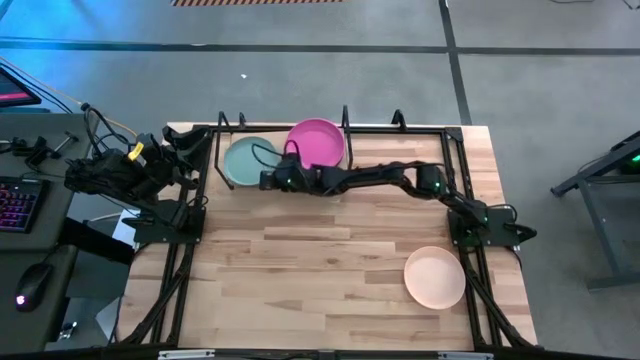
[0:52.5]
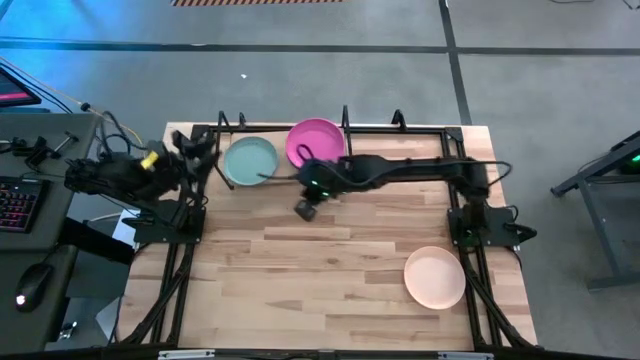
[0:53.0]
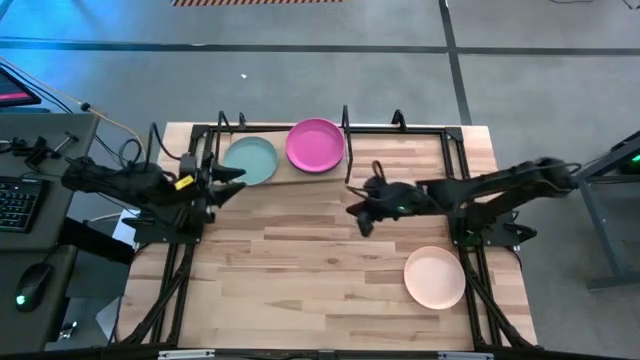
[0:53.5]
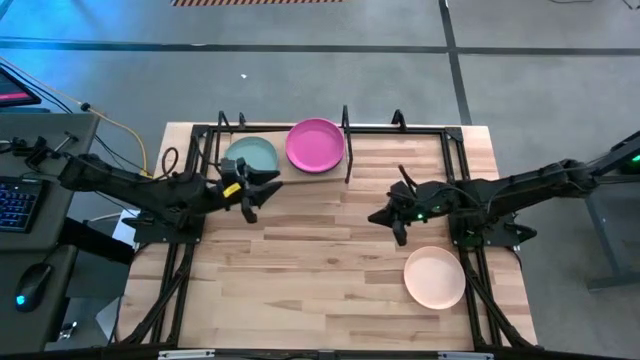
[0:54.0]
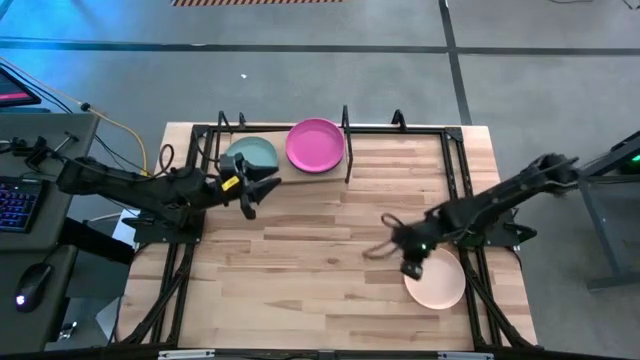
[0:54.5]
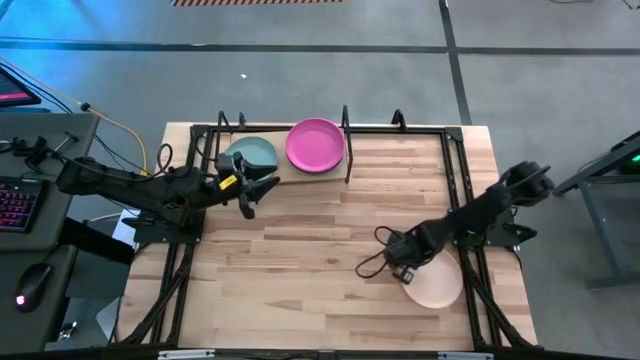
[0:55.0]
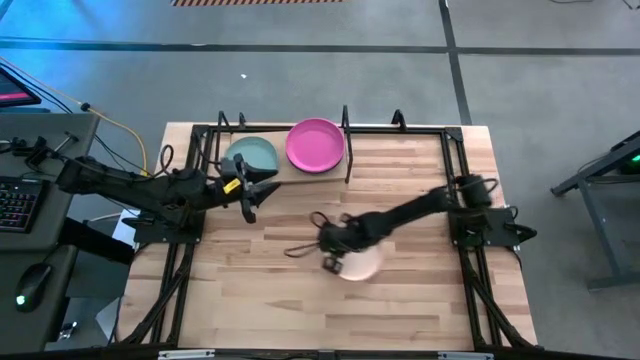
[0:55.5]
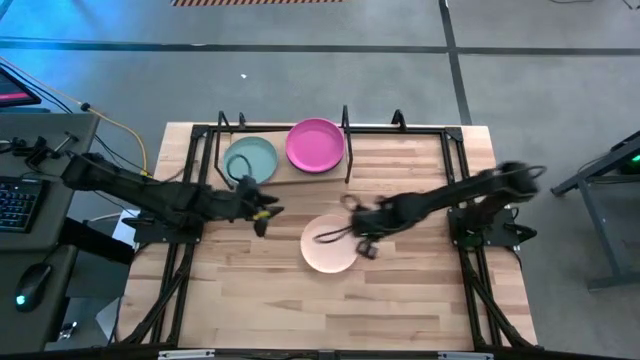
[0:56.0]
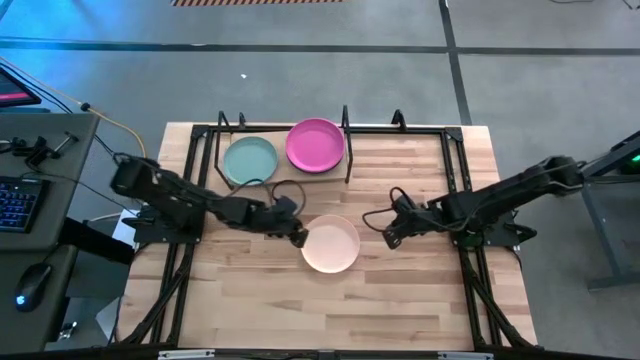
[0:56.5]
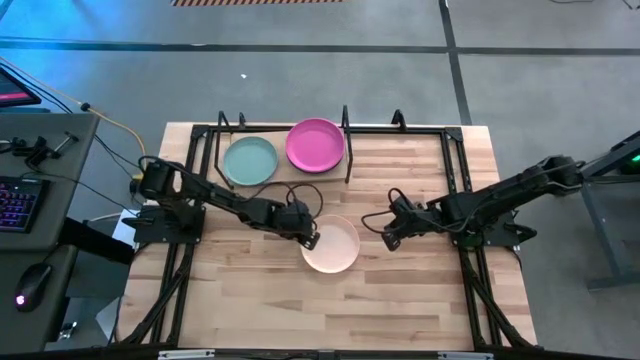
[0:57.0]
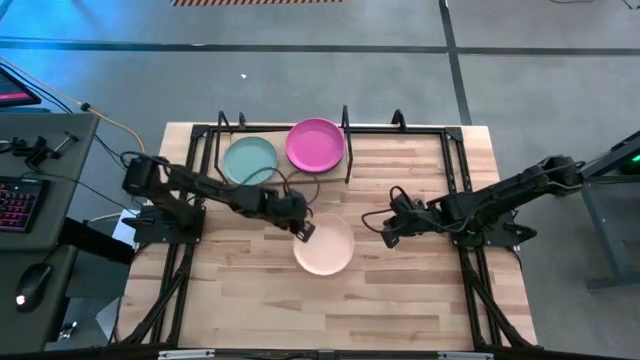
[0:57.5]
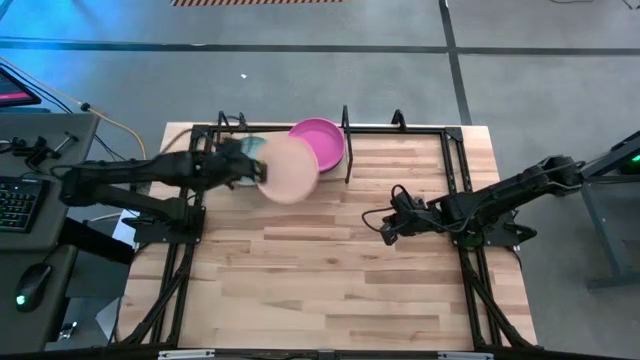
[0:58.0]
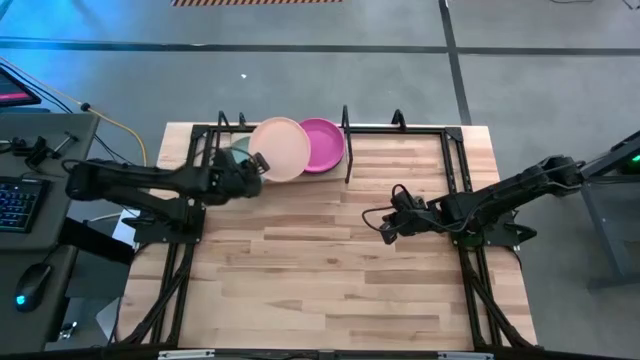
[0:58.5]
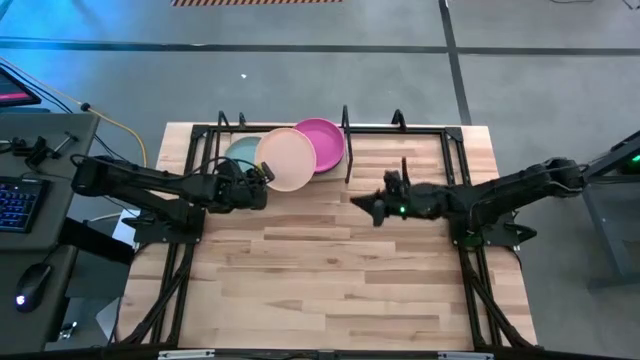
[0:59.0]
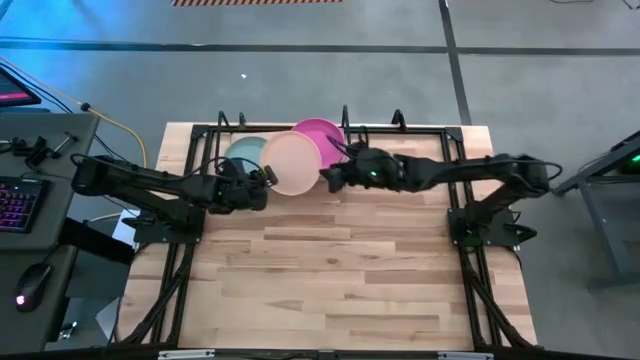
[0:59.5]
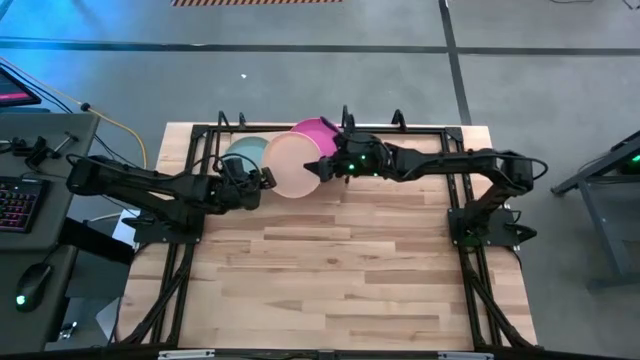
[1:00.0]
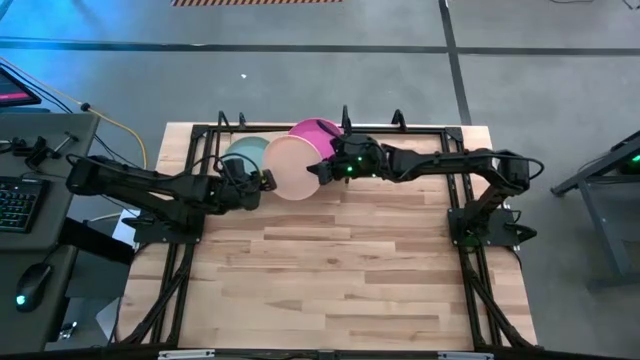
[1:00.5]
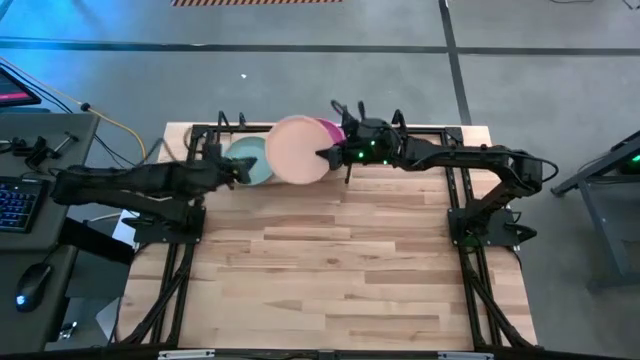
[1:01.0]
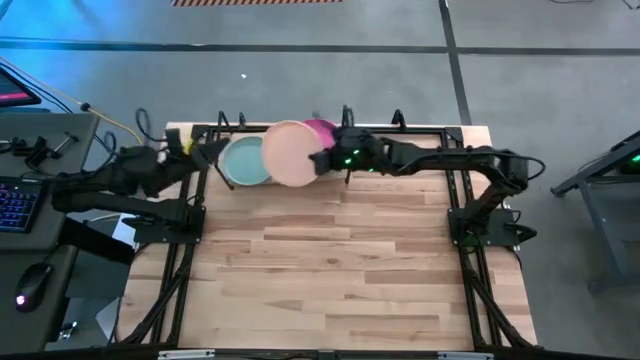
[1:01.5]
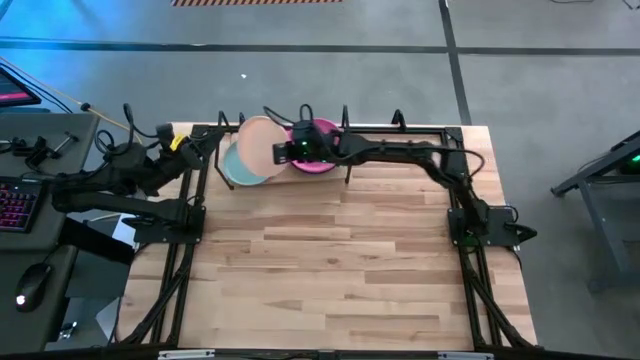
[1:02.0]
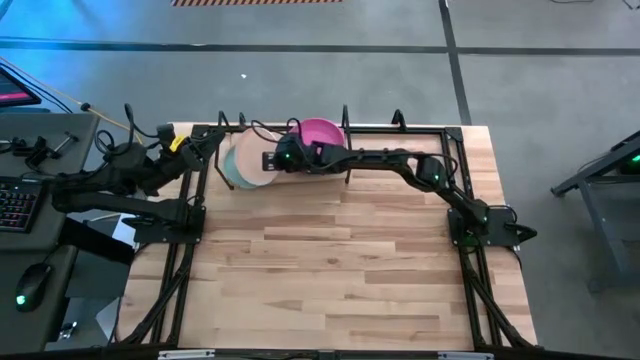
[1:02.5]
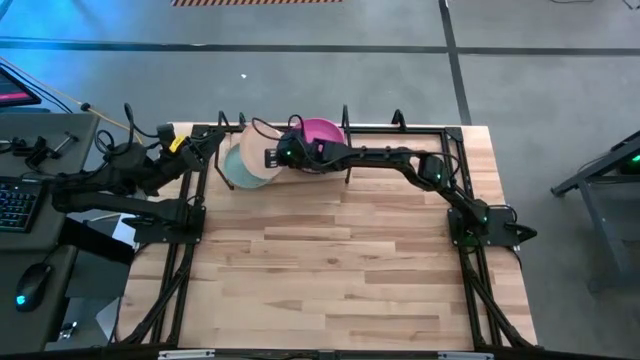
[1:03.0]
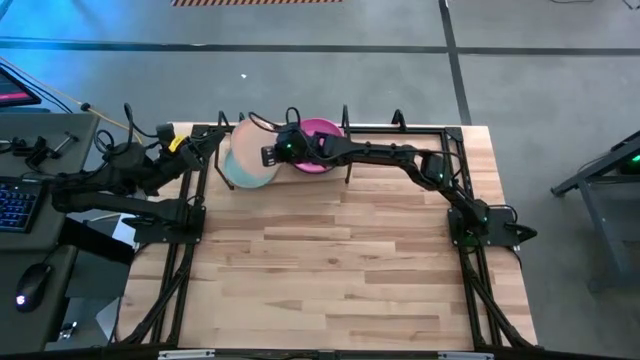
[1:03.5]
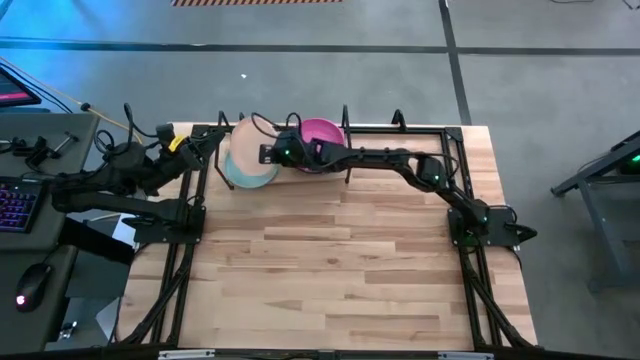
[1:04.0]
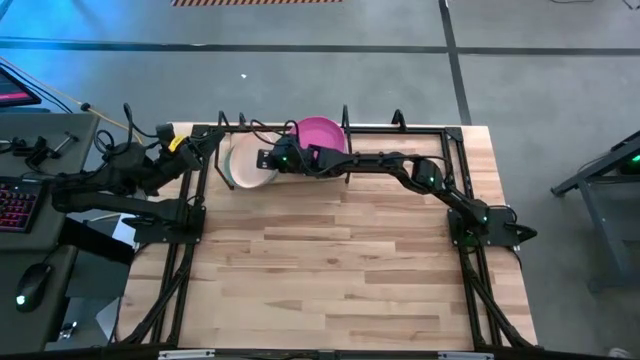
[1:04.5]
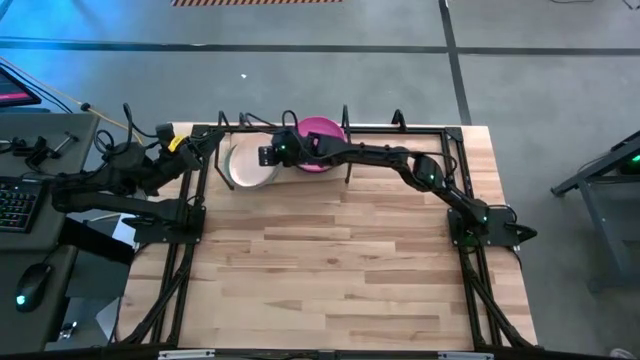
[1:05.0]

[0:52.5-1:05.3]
Task: Place and stack plates onto a shelf
Stack the light orange plate on top of the green plate on the shelf

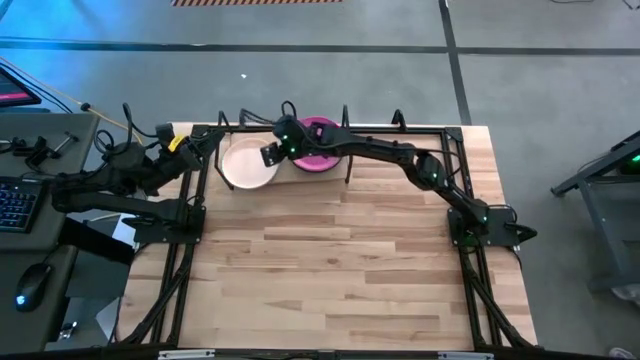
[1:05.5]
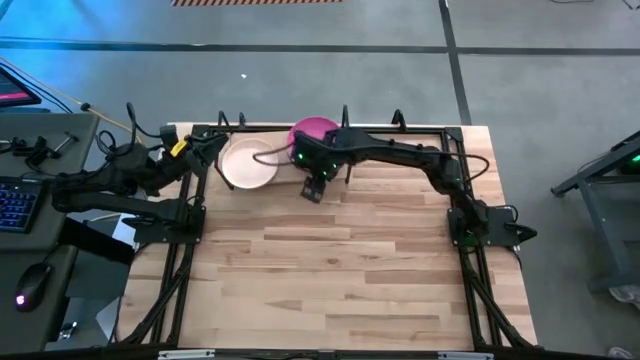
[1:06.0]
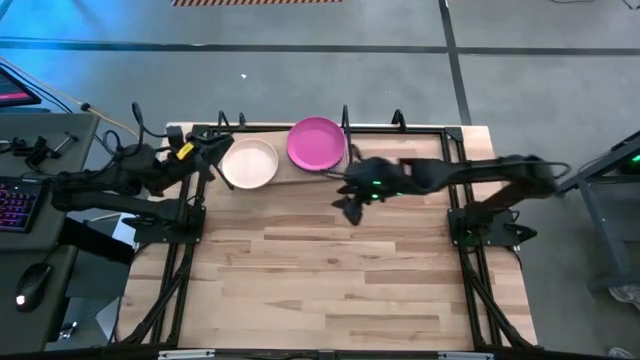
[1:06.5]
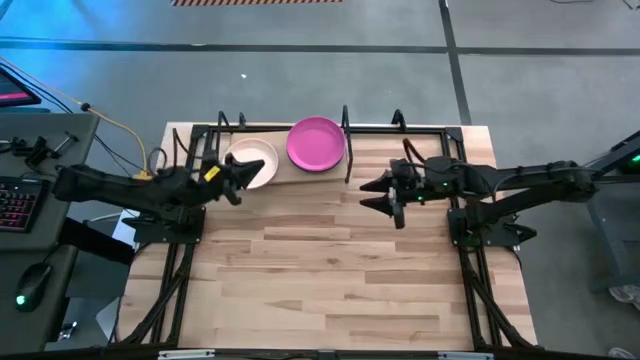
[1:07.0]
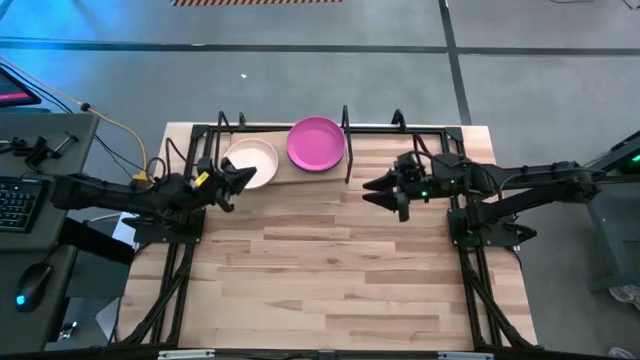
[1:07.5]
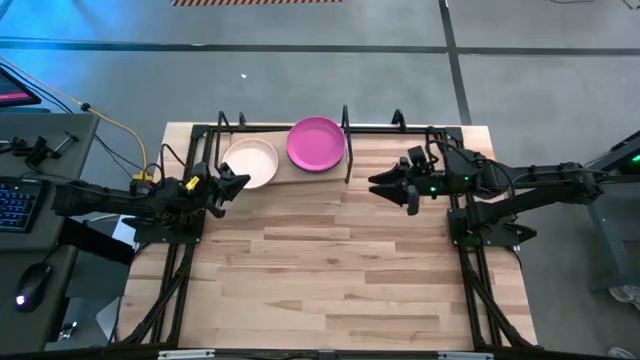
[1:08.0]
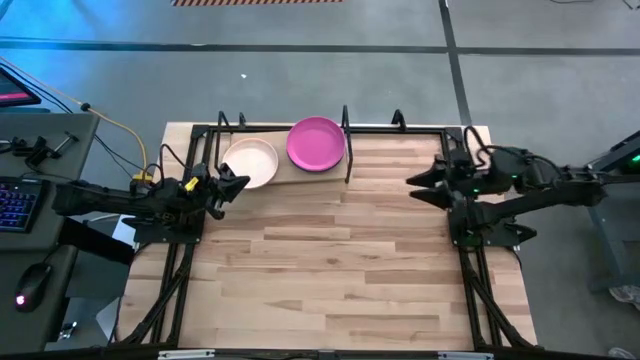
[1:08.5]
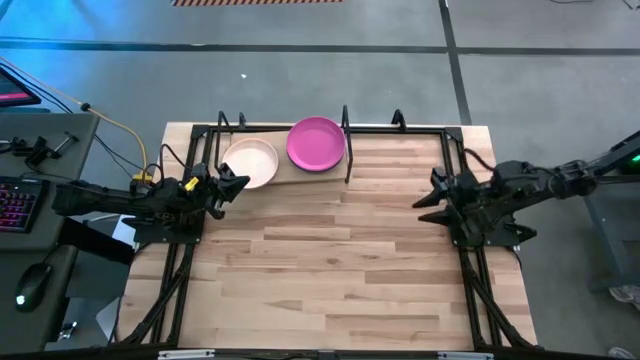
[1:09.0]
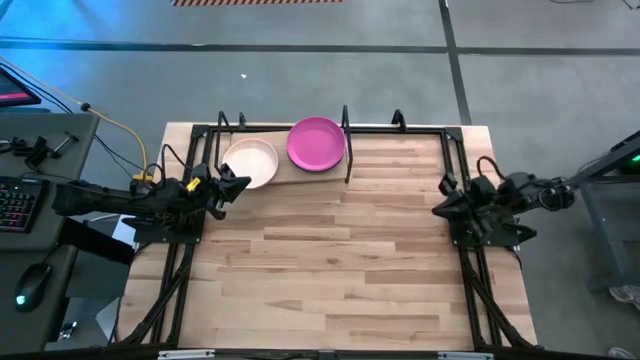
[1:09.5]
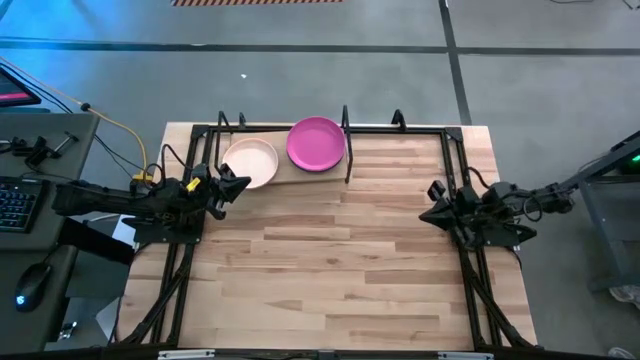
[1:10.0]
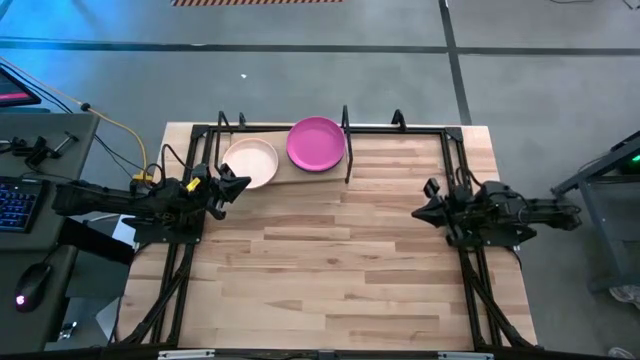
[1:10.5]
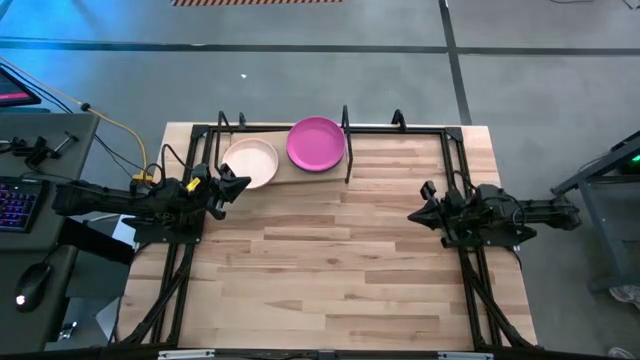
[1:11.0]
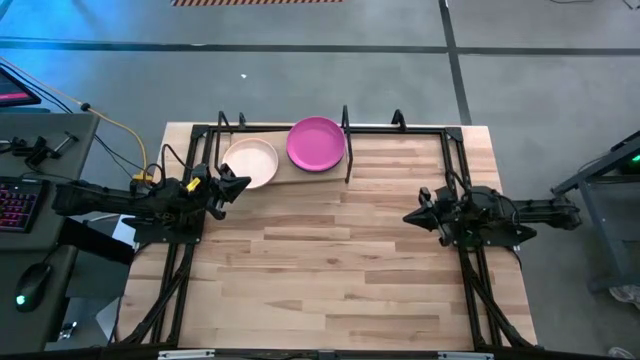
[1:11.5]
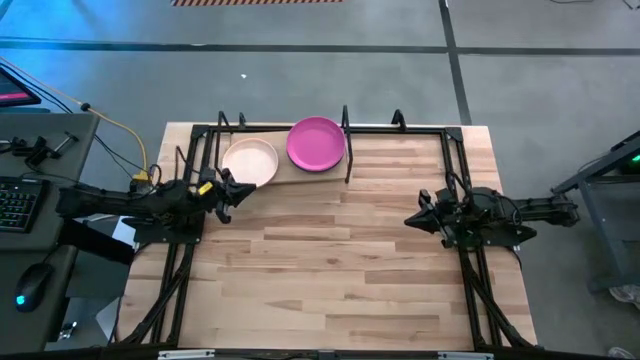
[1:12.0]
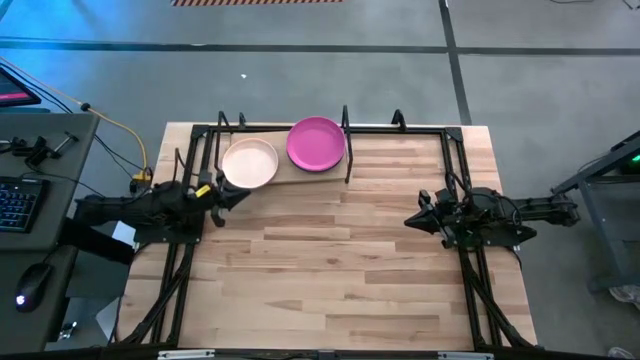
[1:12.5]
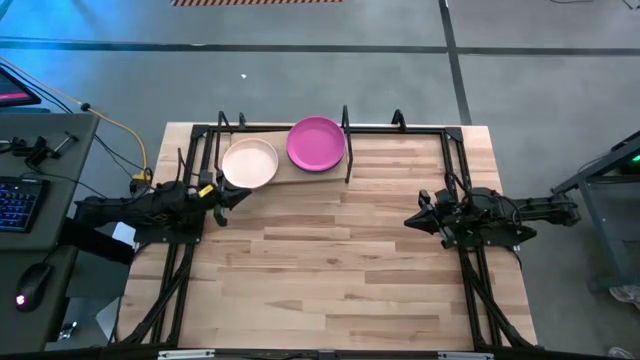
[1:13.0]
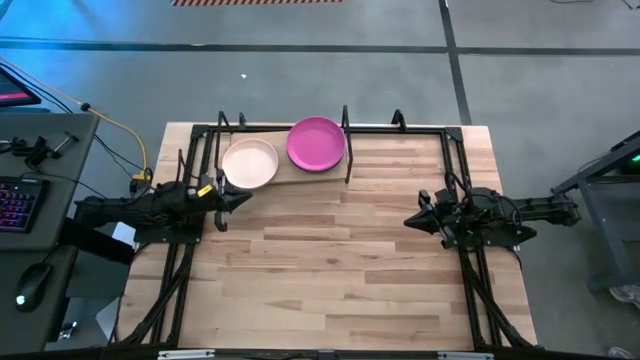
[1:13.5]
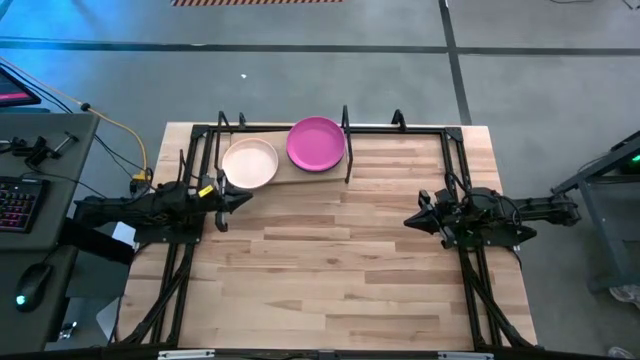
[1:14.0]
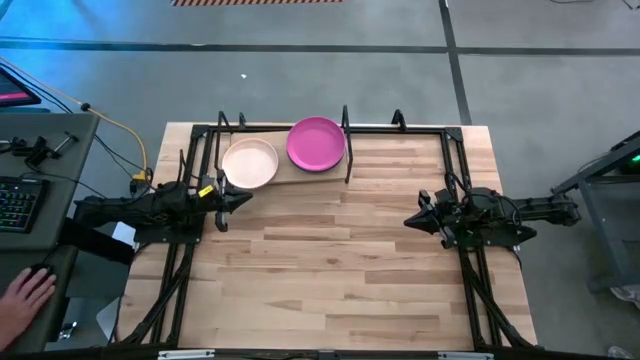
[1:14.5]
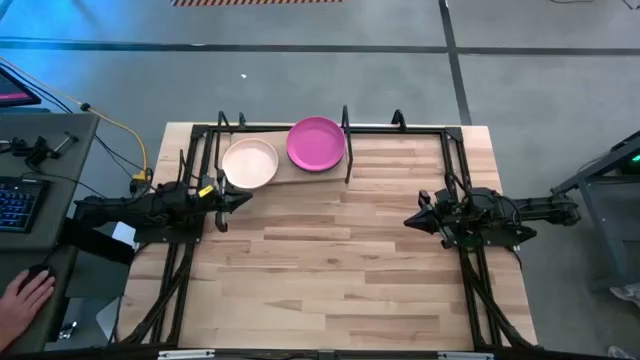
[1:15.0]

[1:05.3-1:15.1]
Return to Home Position
